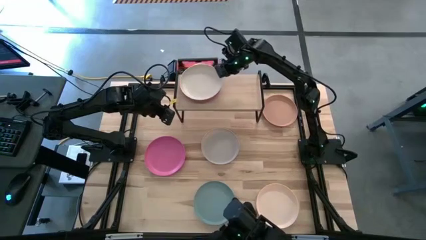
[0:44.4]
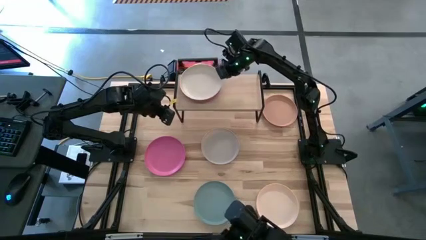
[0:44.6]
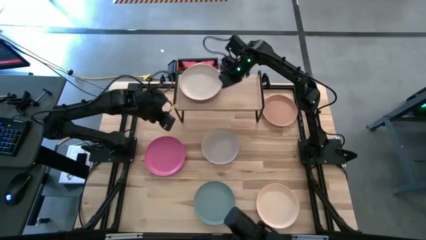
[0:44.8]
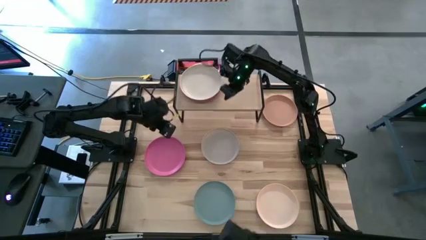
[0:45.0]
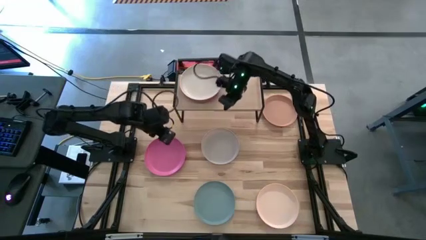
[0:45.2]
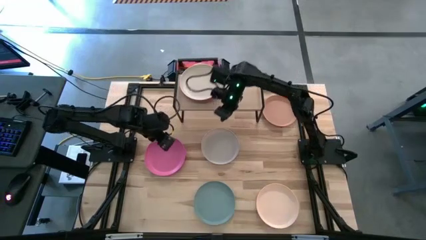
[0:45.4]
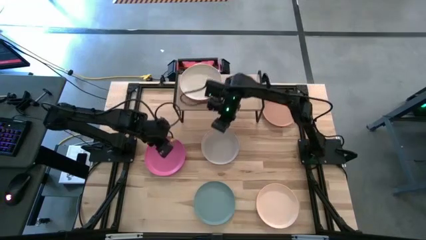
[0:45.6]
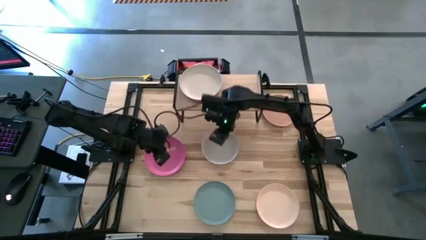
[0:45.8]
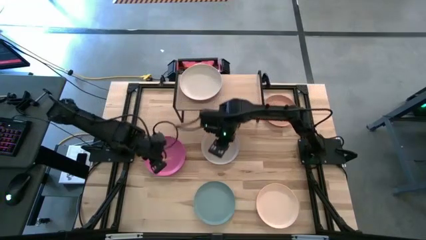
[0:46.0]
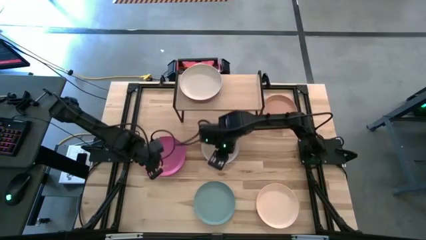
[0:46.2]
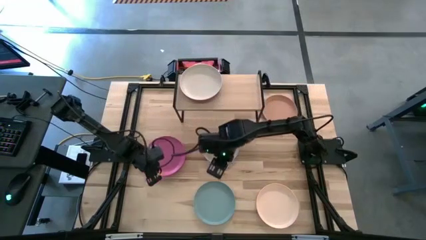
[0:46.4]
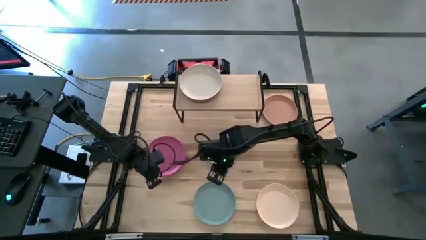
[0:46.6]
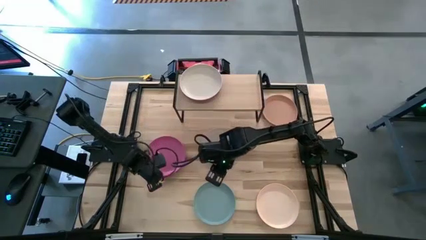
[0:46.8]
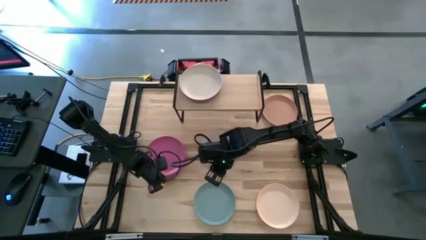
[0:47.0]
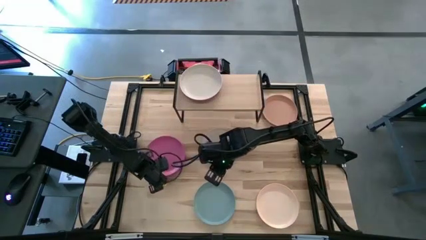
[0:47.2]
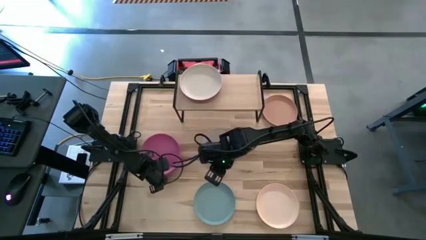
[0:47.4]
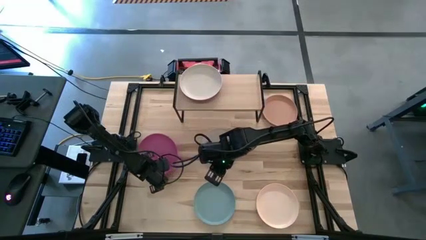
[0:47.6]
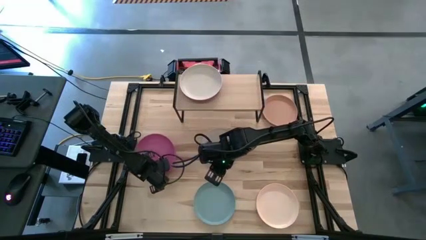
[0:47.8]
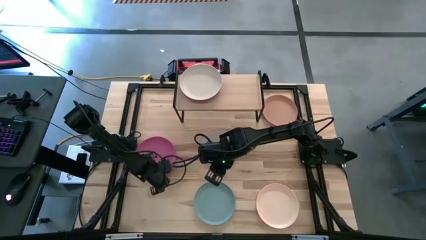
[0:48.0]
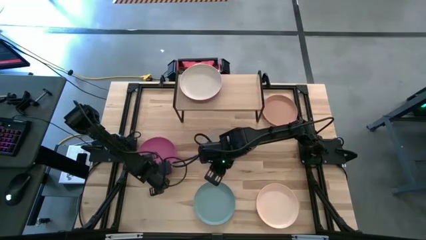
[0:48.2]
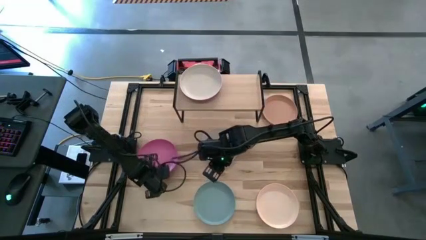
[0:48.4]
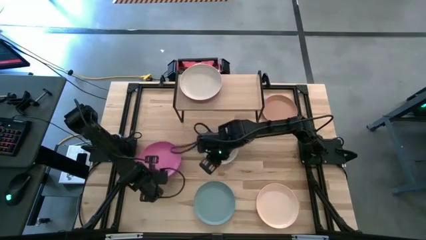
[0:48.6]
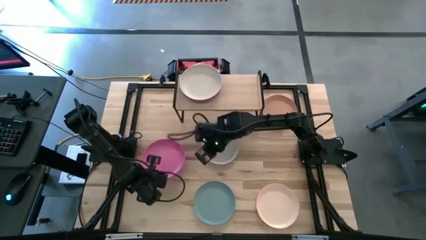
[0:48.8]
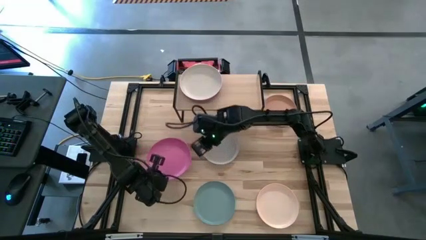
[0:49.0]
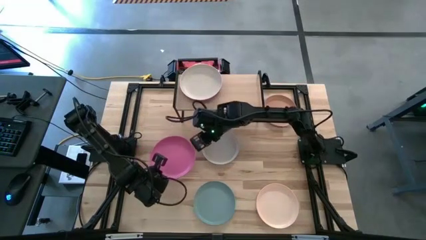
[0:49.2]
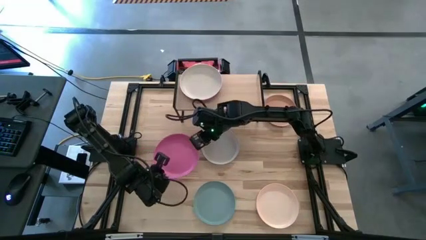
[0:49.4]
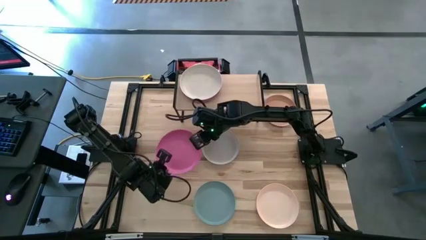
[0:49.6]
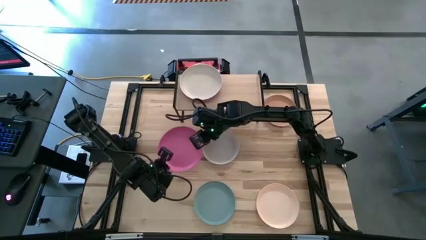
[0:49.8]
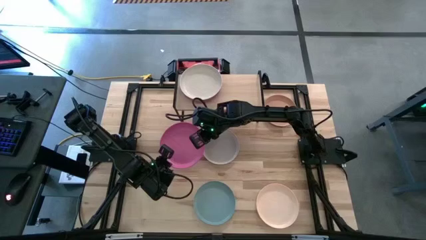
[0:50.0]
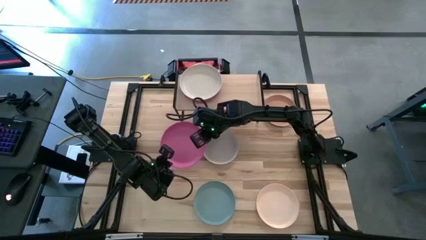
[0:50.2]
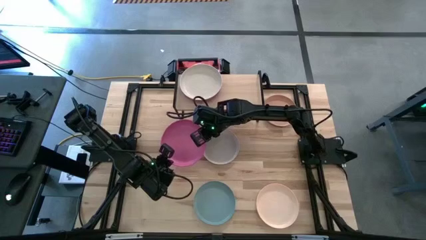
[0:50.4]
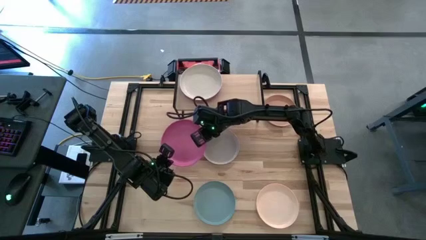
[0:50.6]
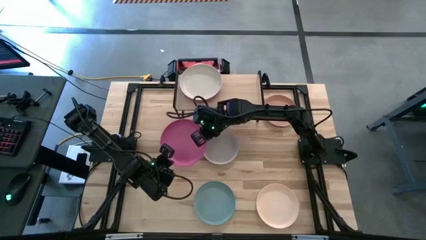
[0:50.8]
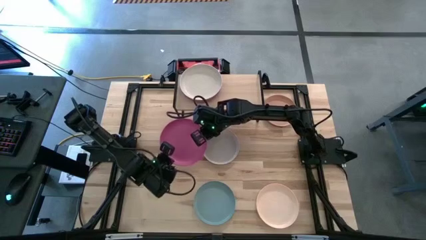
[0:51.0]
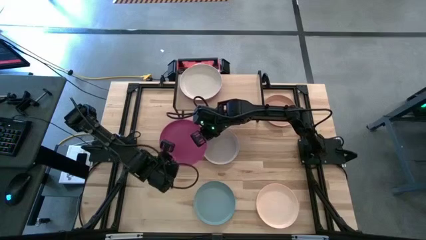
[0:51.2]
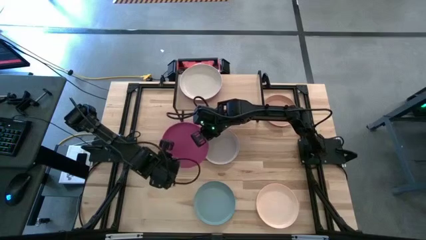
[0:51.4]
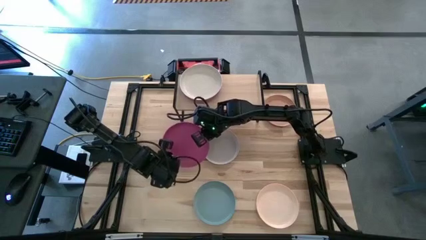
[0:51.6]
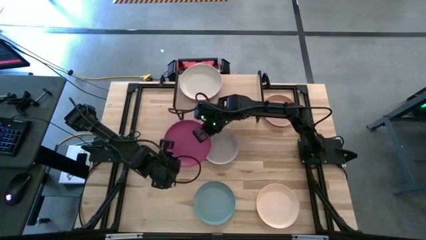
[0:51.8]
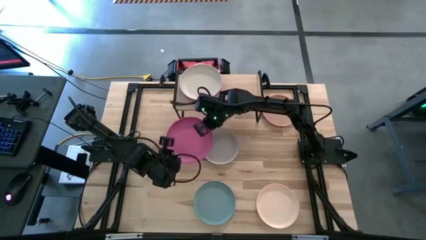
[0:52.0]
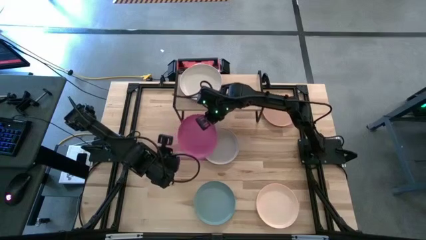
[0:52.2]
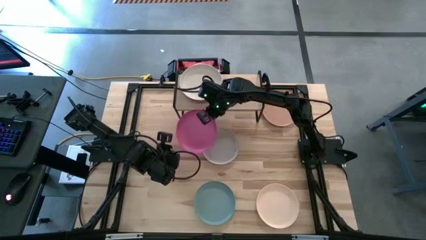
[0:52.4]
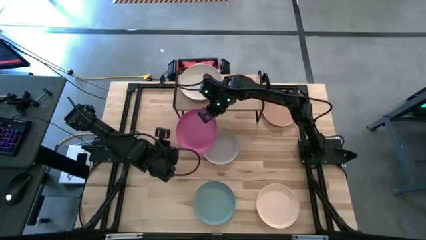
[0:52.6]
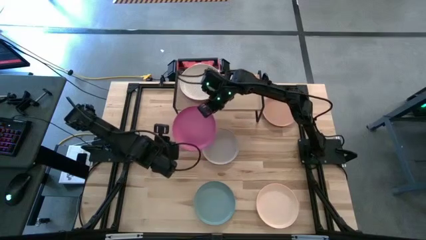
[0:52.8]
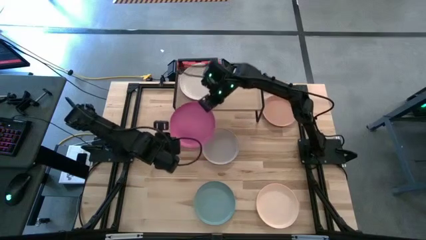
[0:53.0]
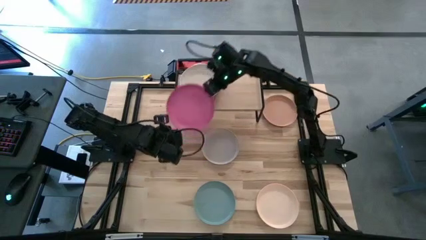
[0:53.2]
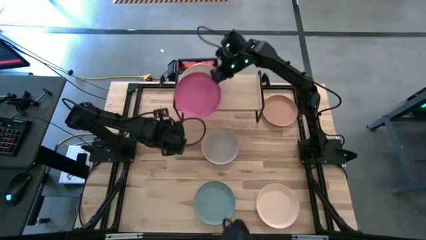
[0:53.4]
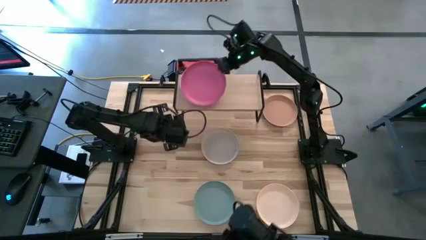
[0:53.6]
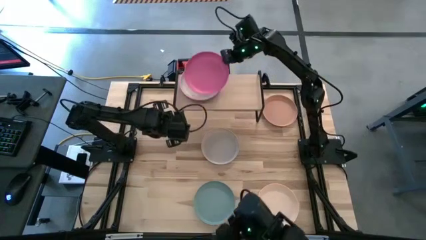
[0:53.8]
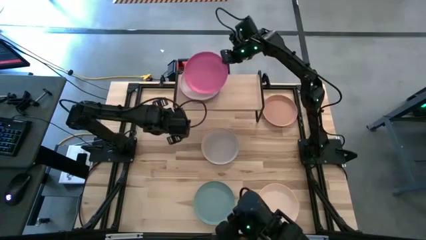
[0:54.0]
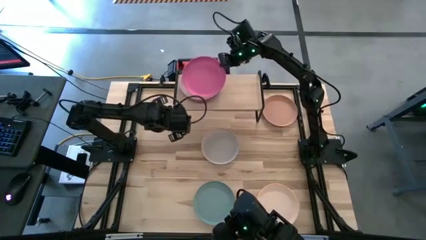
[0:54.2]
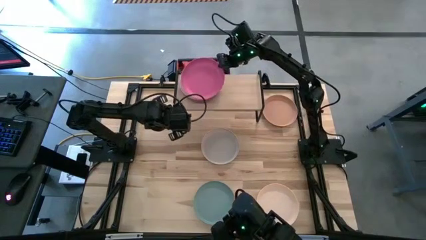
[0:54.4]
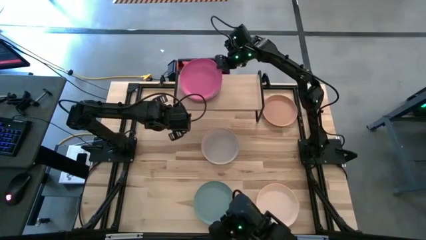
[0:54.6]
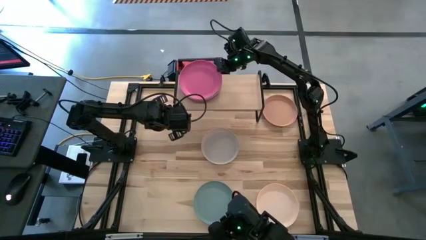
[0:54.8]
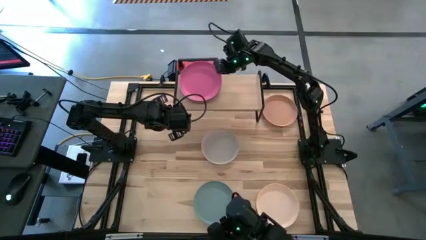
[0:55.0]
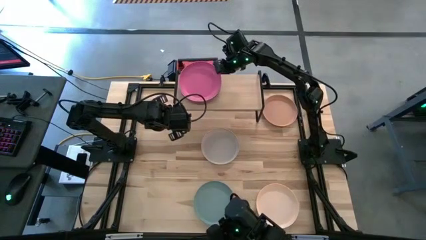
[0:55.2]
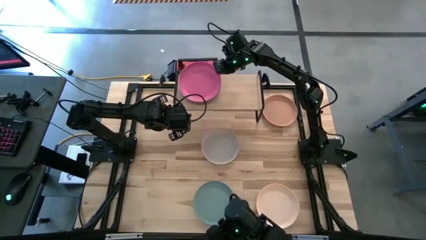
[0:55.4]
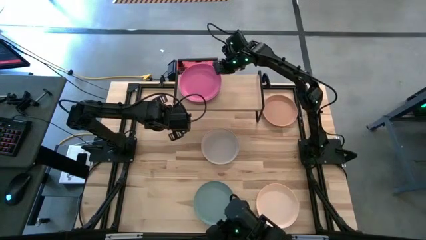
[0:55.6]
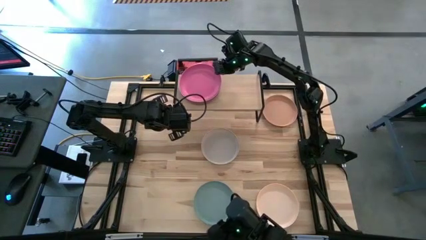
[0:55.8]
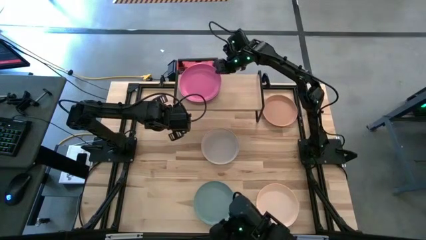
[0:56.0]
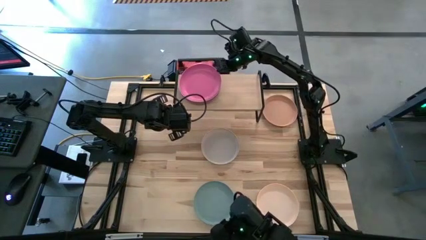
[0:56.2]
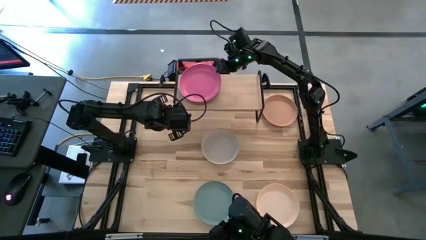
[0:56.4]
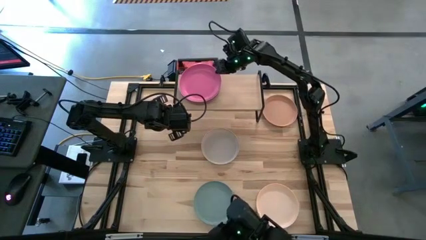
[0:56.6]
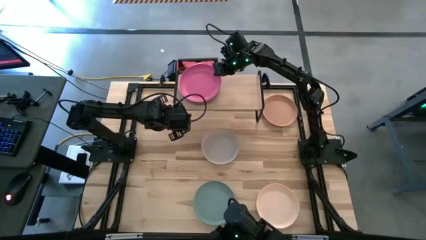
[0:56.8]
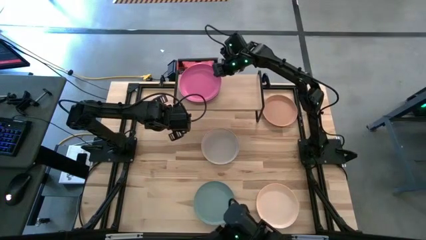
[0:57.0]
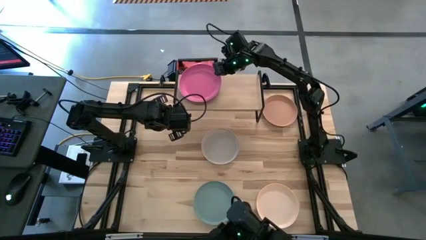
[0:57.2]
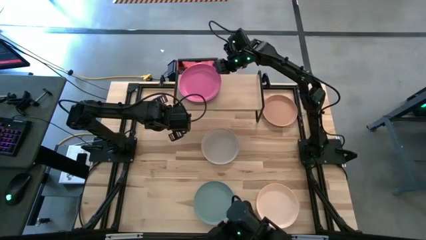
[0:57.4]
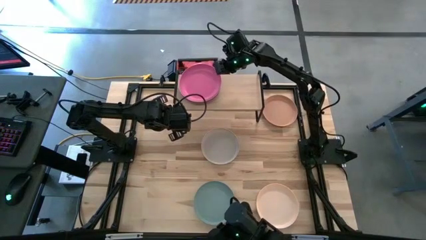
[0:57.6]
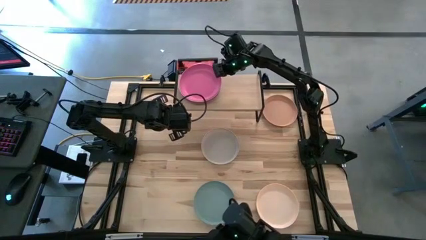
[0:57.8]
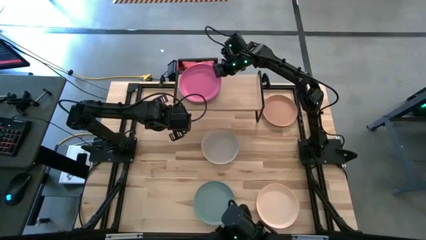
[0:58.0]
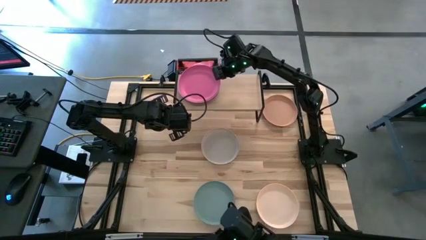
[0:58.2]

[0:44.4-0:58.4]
Task: Place and stack plates onto a shelf
Stack the pink plate on top of the light gray plate on the shelf
